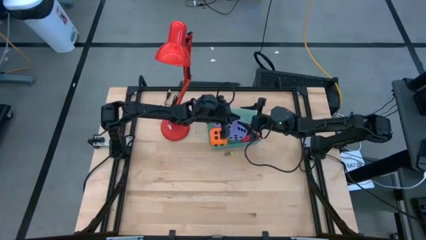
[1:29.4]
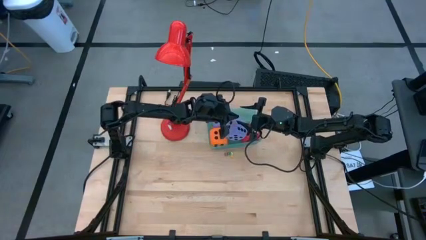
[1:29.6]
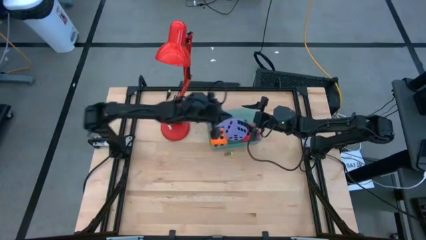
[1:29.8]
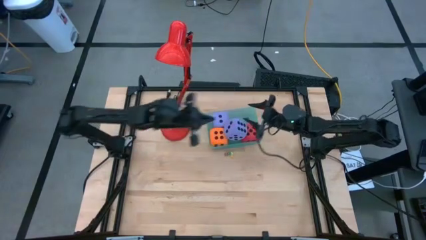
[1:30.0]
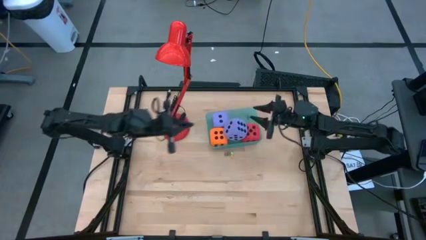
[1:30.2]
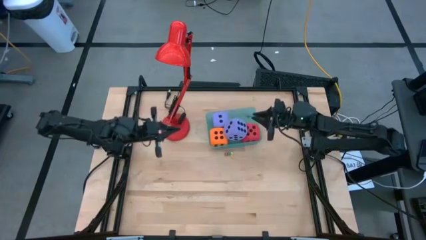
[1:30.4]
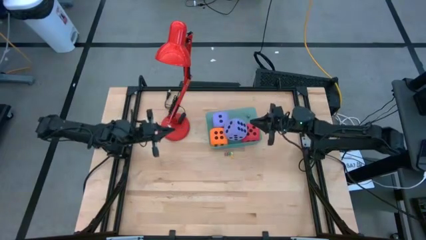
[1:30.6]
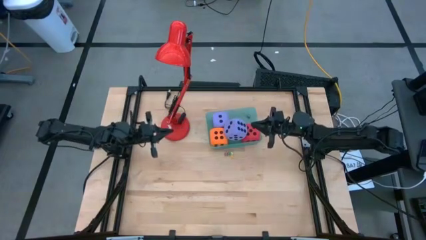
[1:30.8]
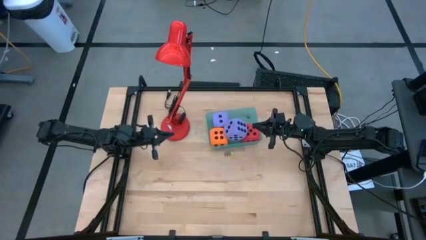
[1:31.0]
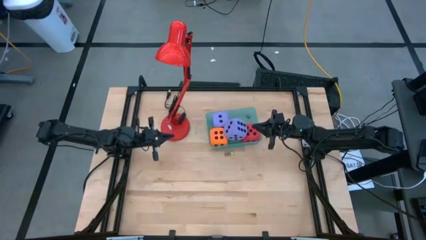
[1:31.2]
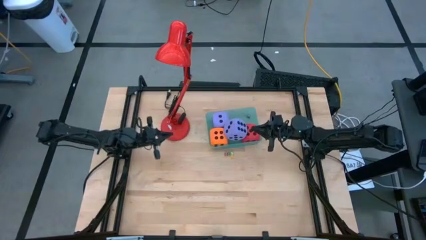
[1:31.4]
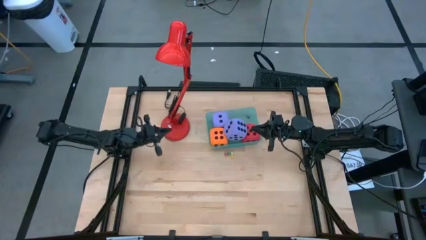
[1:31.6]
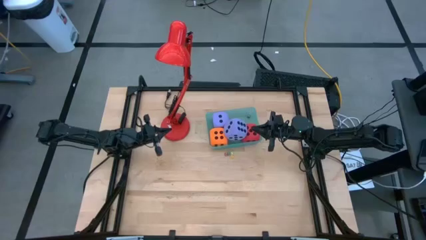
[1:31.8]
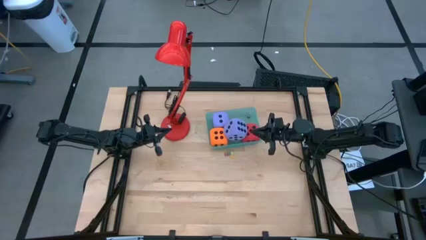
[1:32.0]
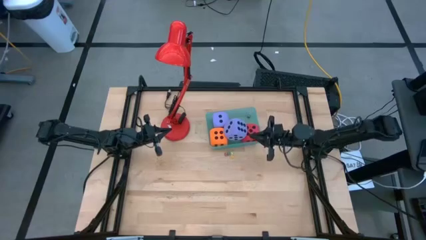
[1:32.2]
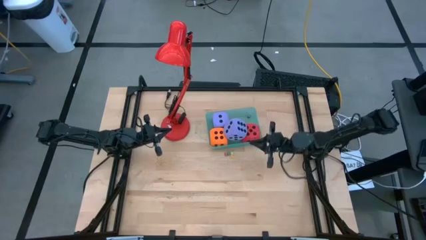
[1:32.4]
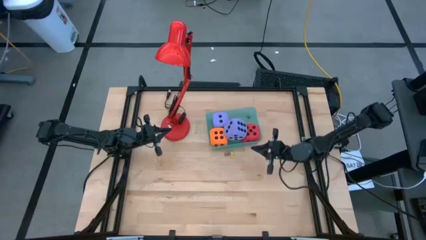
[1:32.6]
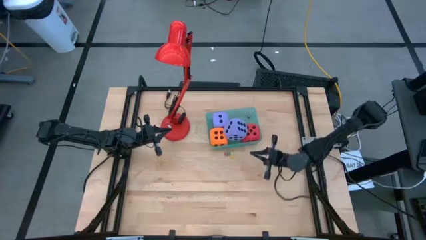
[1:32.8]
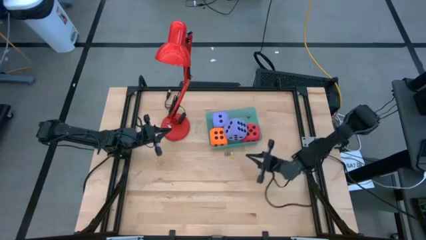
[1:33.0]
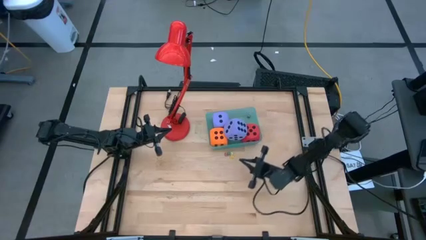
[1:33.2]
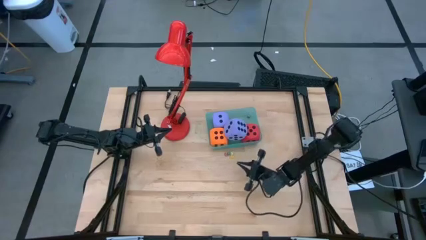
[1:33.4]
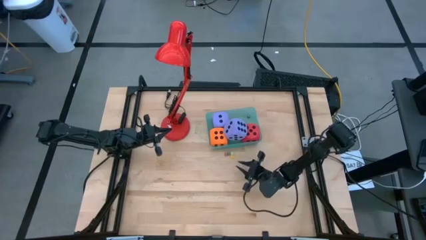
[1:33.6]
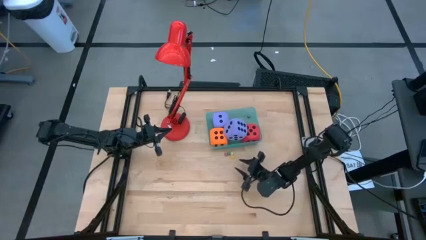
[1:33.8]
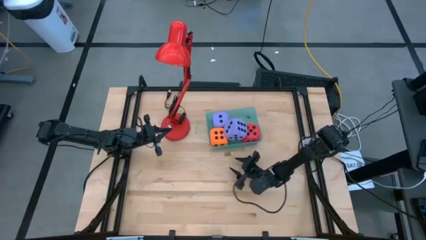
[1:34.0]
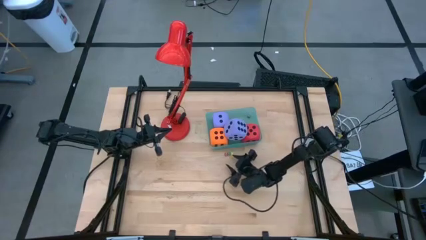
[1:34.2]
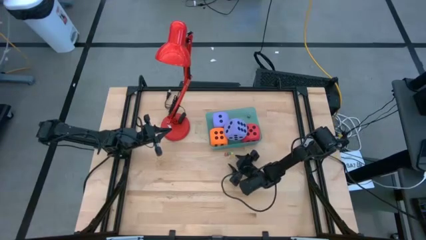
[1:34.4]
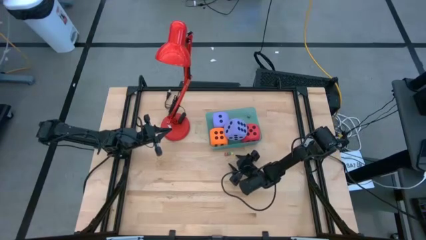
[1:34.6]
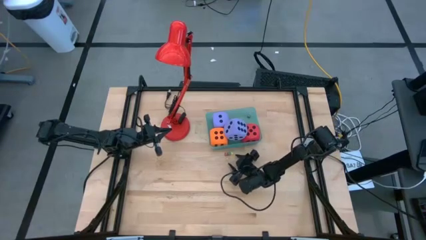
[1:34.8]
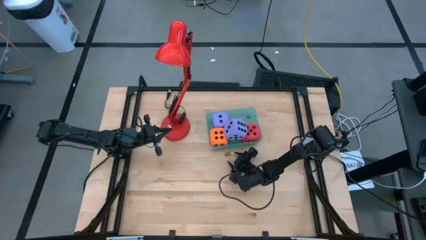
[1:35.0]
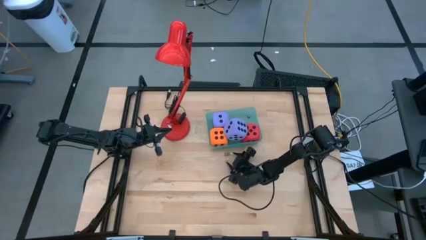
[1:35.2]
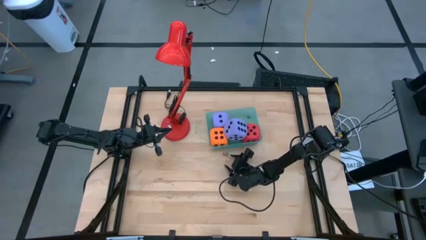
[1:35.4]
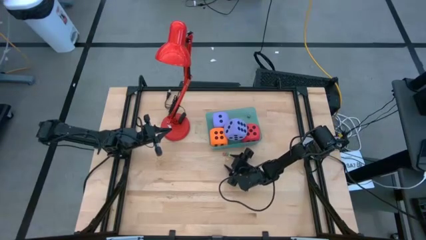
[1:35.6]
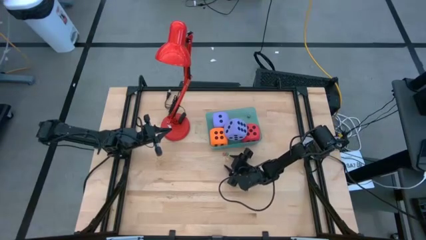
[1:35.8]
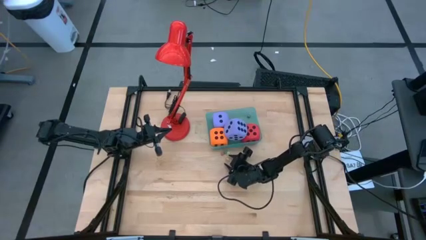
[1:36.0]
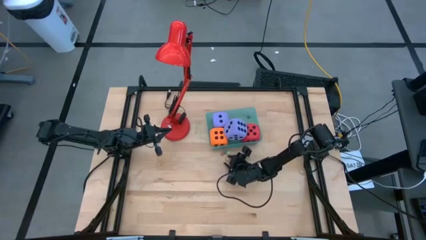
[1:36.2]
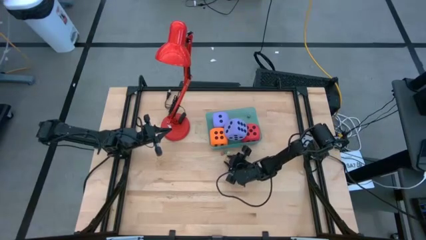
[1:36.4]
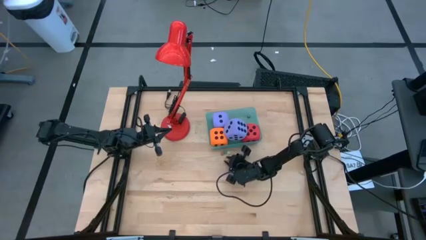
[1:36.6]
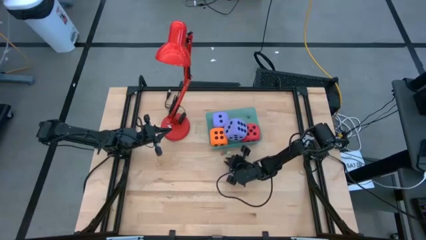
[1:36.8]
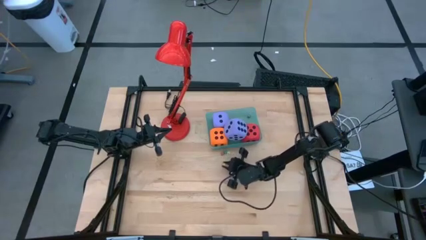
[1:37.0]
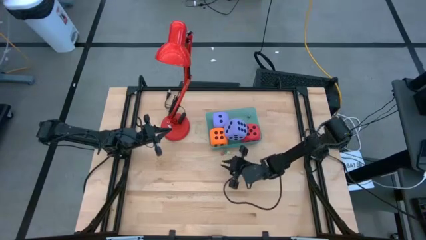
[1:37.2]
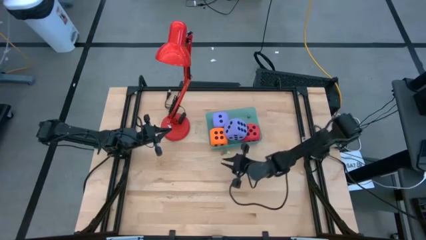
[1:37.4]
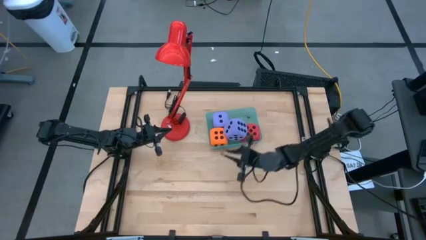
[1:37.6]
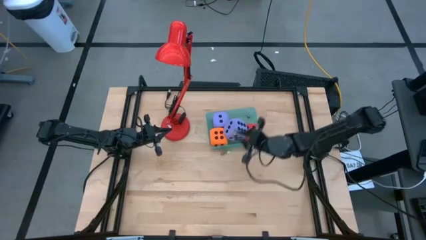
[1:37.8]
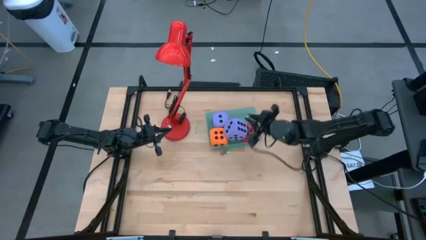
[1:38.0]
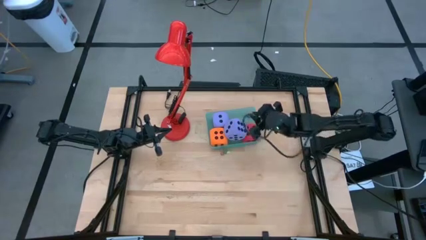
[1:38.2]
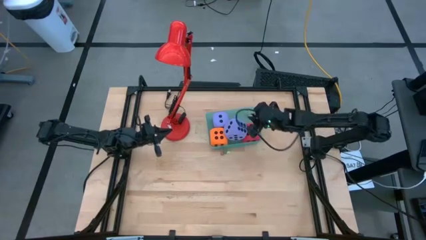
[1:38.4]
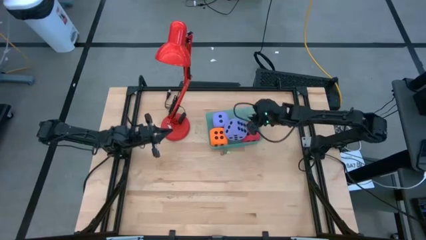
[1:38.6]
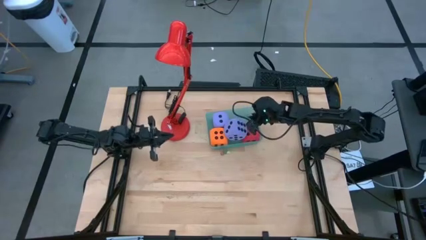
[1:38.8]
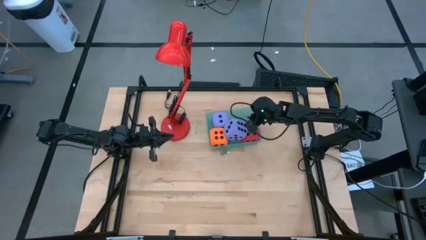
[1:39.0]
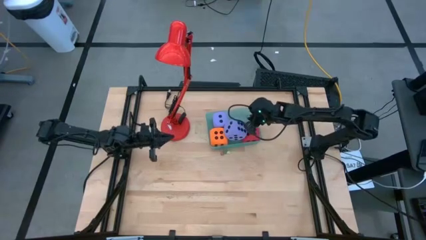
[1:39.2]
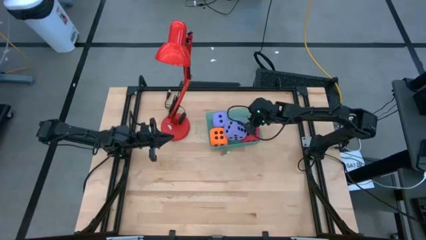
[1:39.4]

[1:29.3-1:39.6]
Task: Pick & Place Dice
Put the small yellow dice into the bin

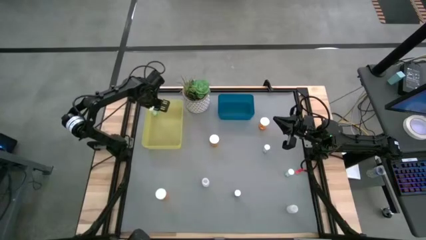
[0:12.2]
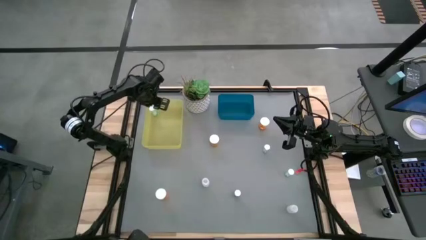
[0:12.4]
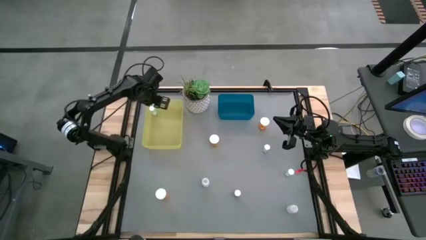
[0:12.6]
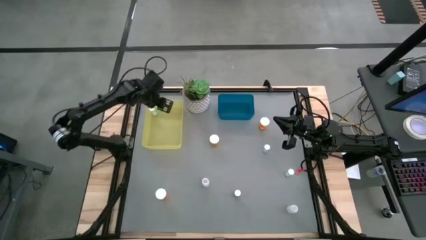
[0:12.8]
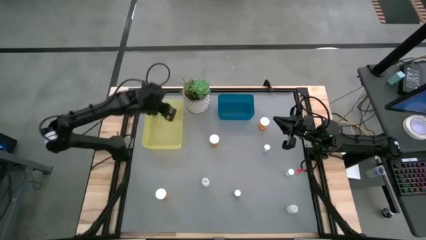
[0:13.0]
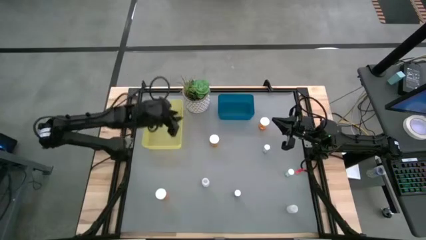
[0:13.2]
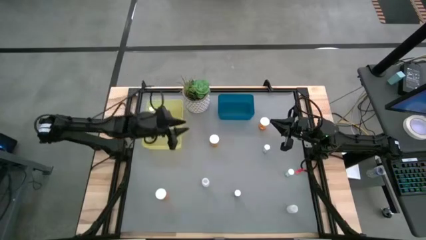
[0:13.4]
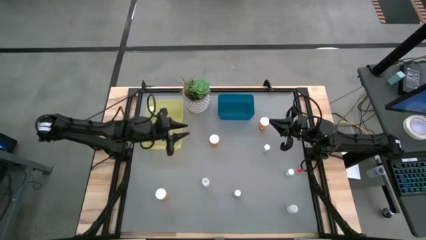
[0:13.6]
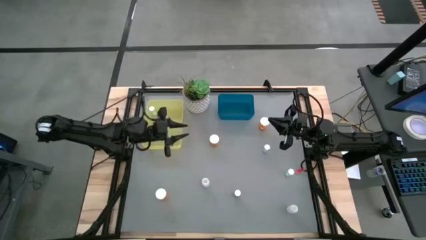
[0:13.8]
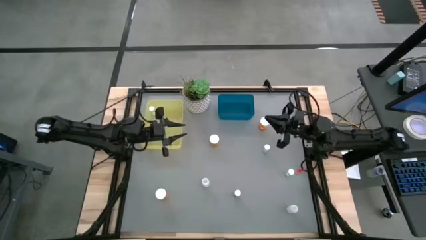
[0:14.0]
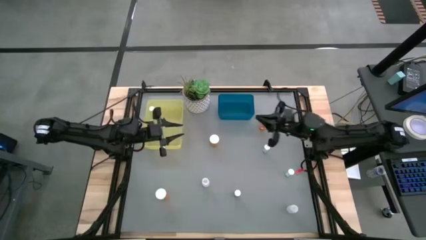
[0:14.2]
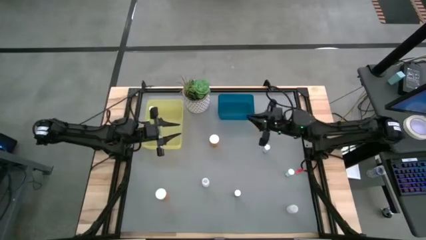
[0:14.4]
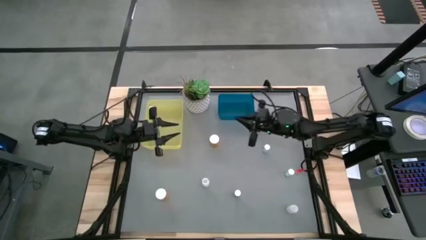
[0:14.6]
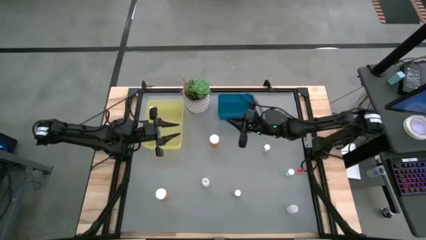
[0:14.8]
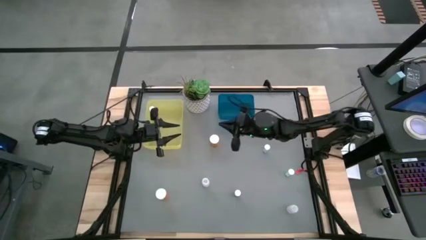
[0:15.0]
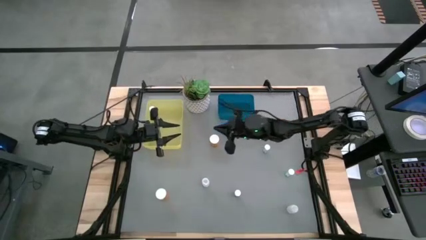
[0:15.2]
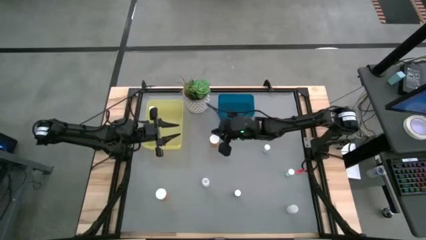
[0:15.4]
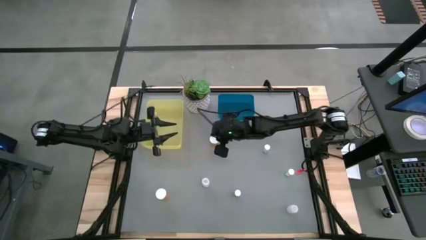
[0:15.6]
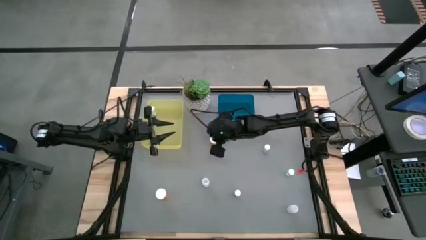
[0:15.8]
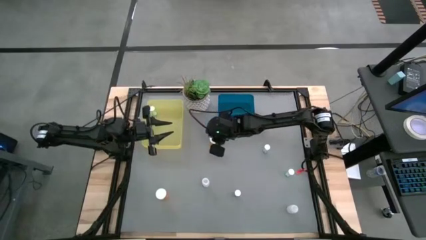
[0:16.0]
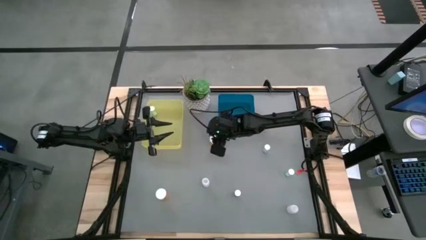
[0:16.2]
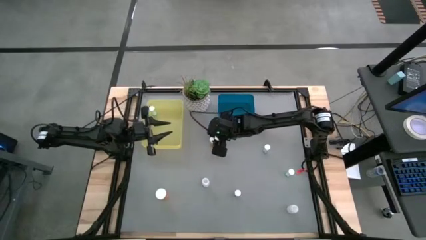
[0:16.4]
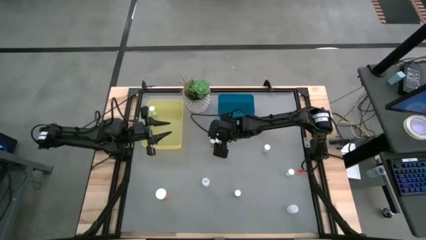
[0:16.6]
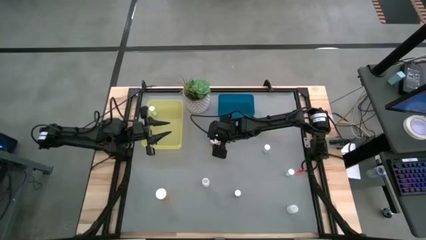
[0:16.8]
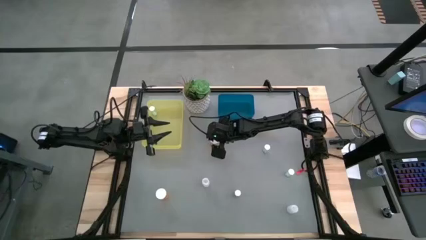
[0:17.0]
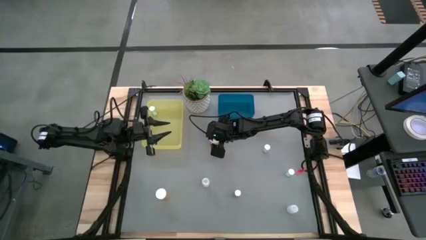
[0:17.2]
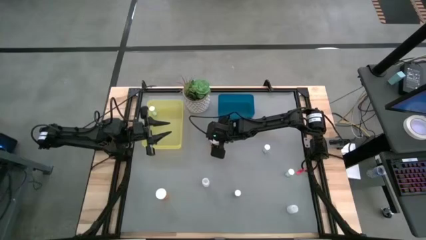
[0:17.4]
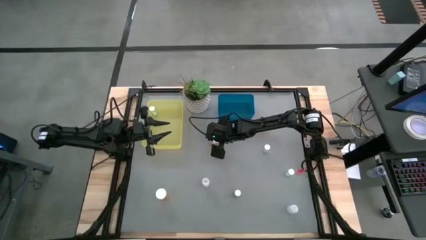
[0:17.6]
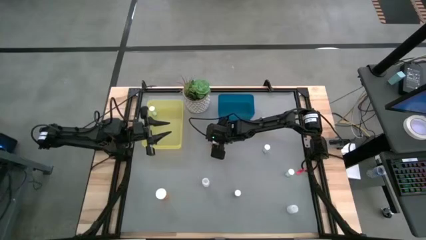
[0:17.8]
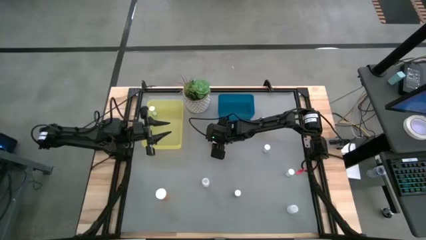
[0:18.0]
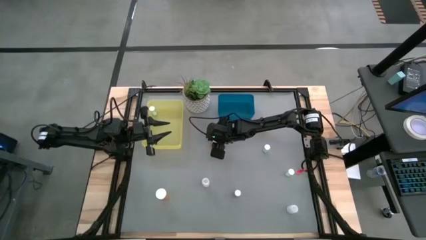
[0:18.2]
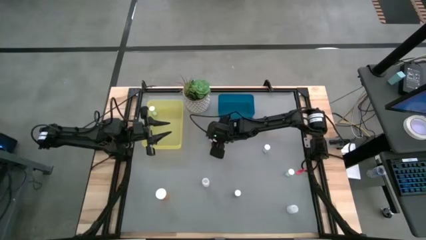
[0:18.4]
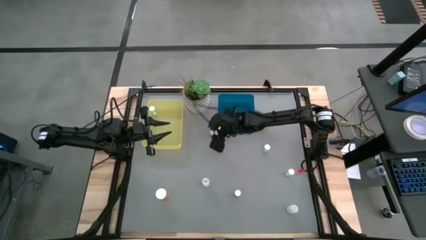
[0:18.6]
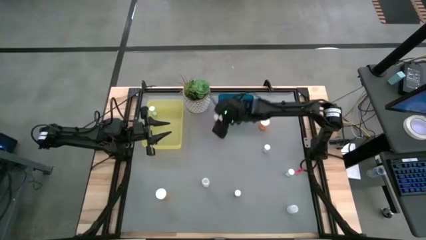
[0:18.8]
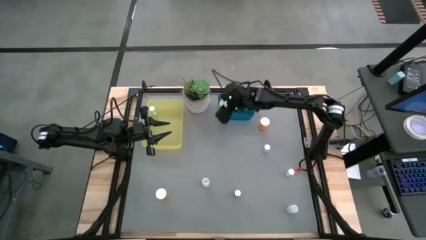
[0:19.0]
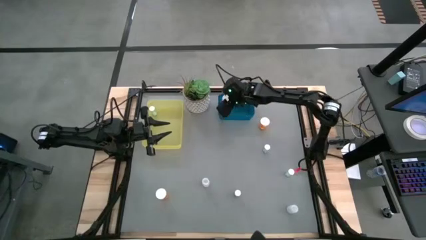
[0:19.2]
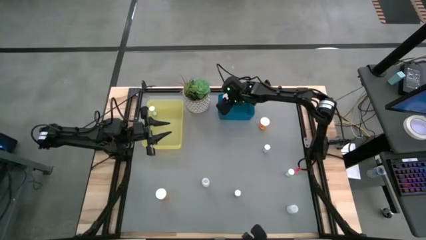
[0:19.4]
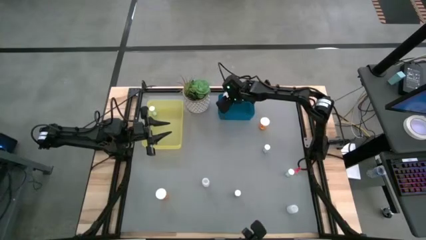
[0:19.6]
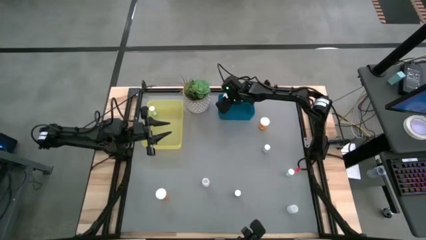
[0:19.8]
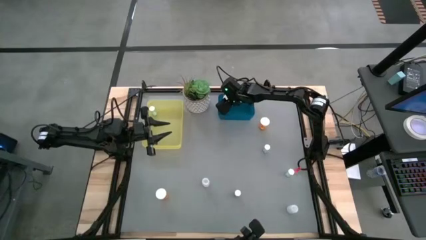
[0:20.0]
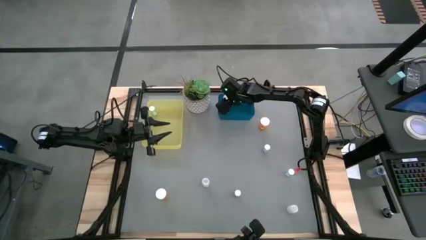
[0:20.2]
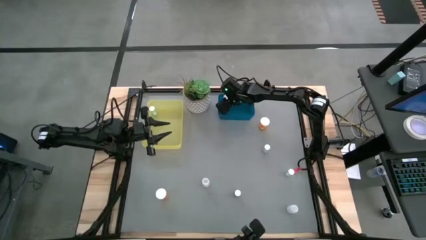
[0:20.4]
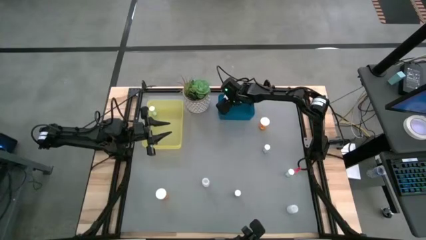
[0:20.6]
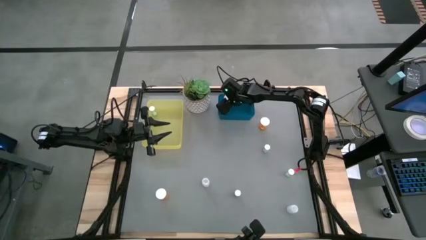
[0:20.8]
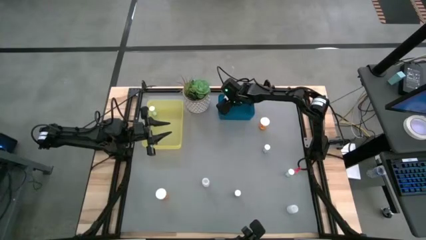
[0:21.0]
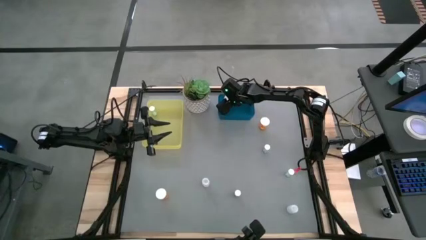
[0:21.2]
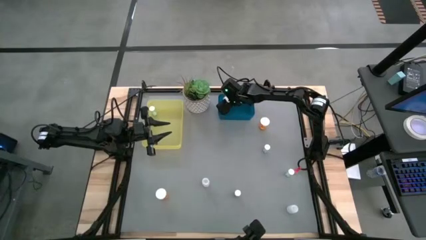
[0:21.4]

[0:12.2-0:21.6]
Task: Pick and place medicine bottles into bin by pill shape (circle, oval)
Put the orange capsule bottle into the blue bin
